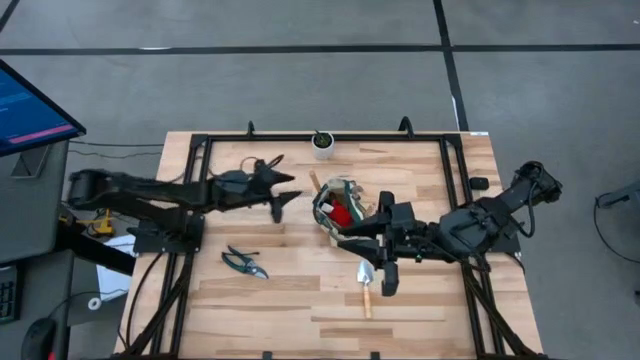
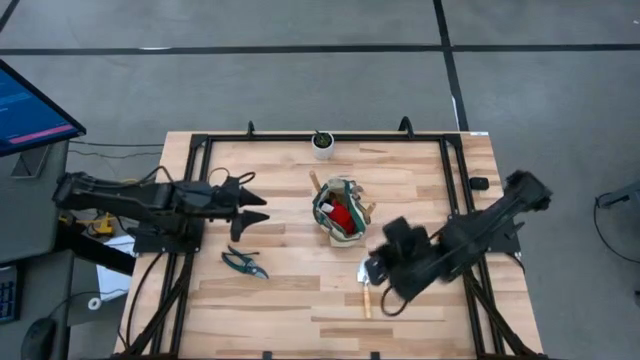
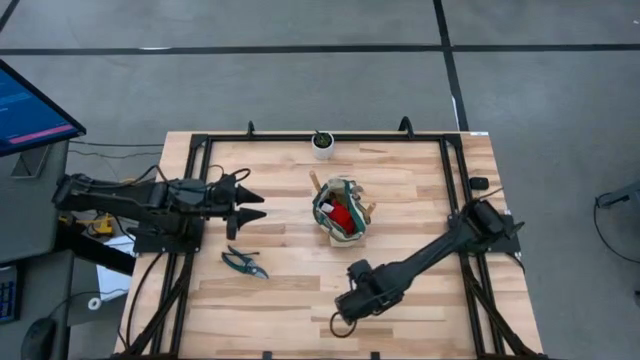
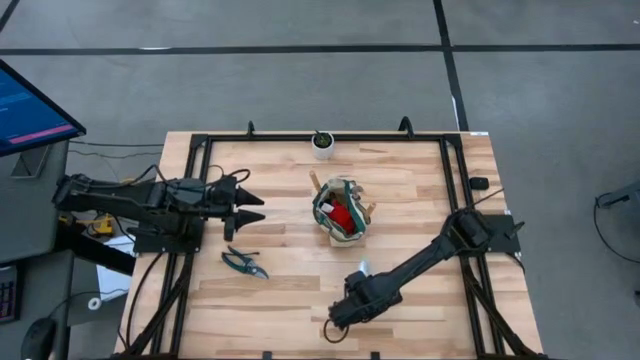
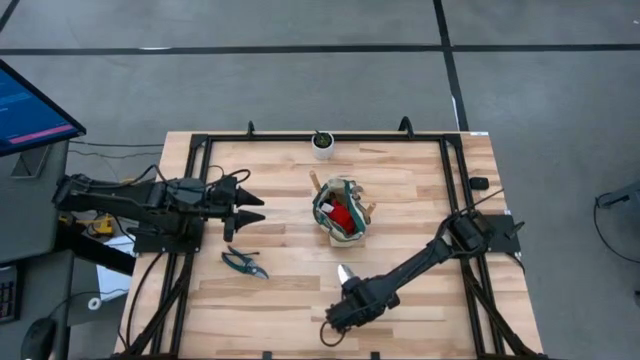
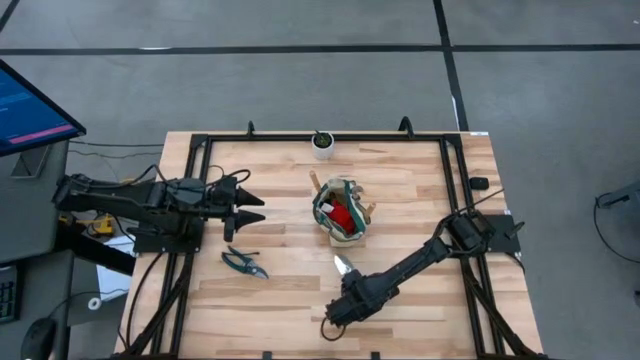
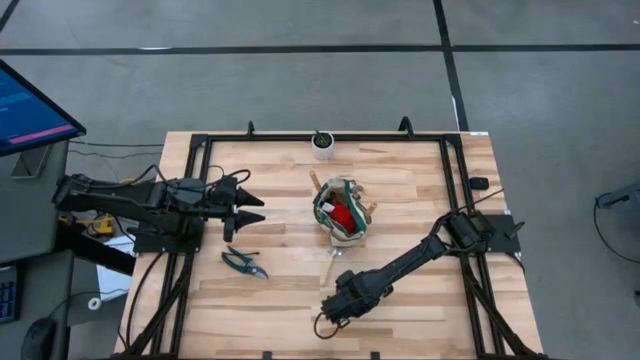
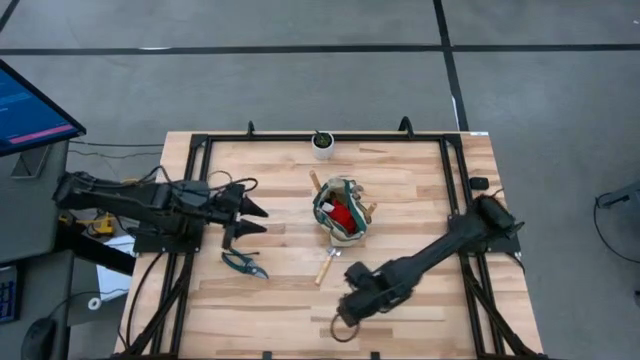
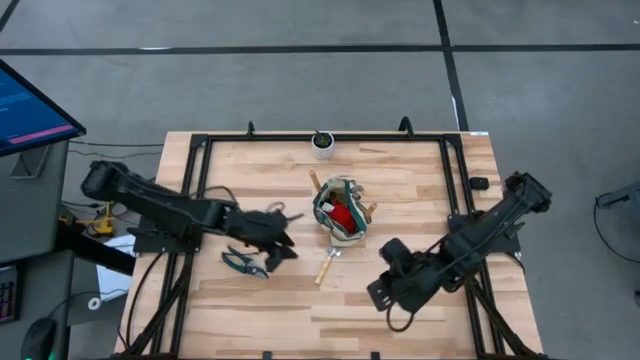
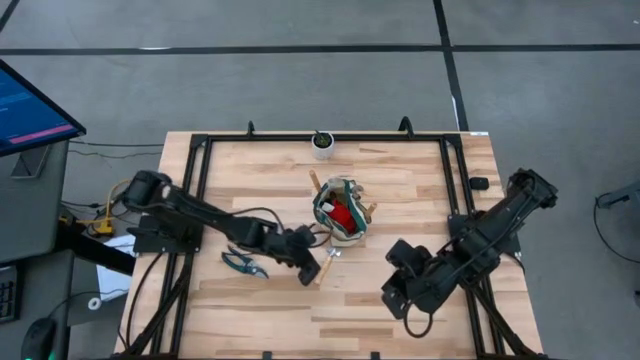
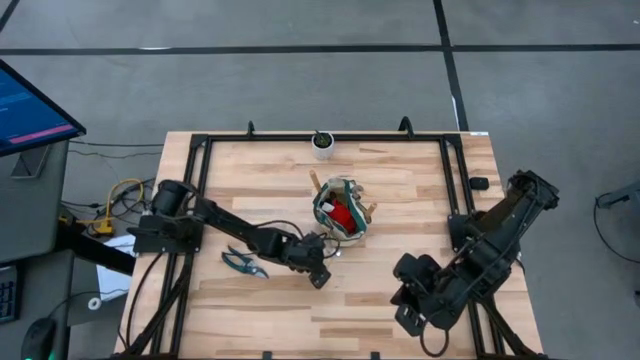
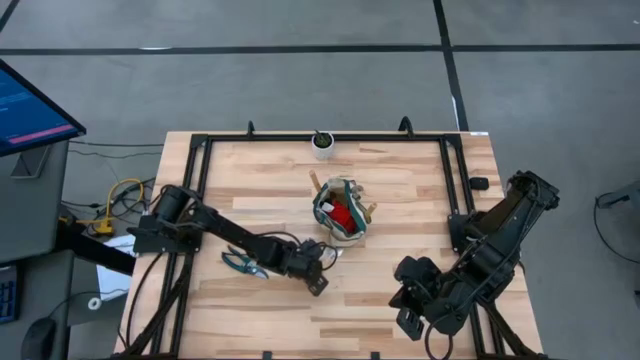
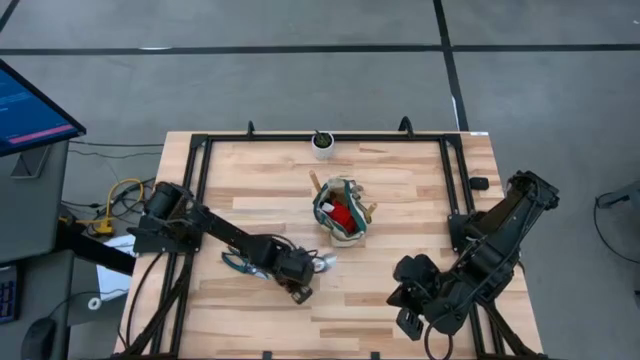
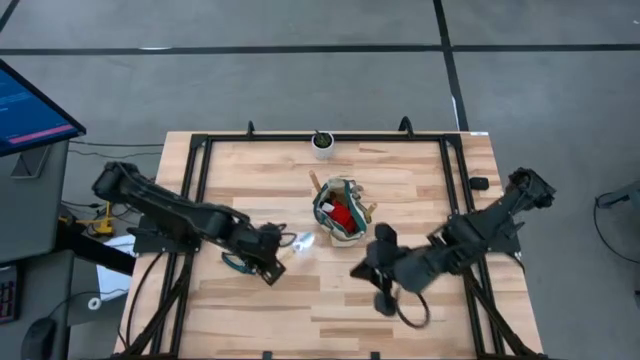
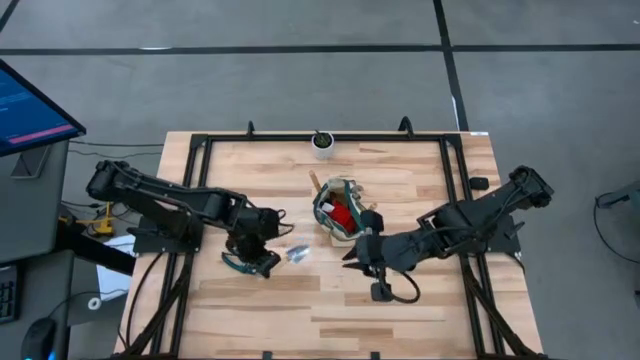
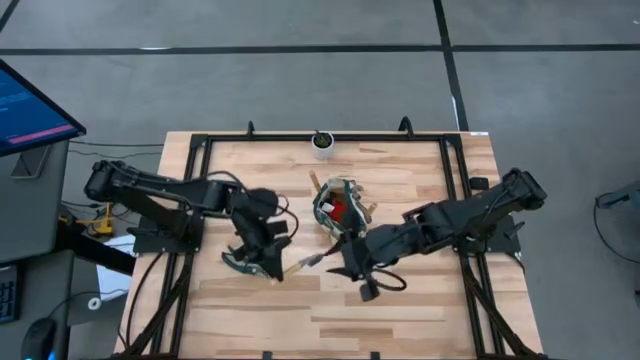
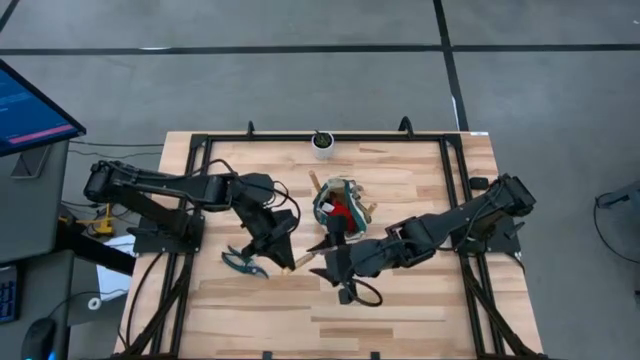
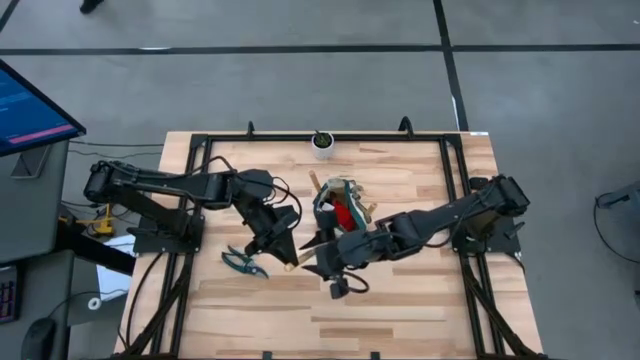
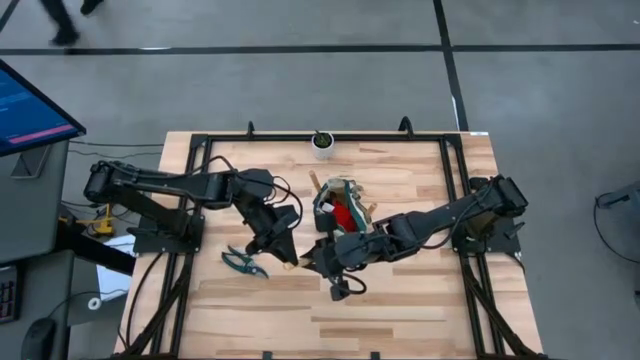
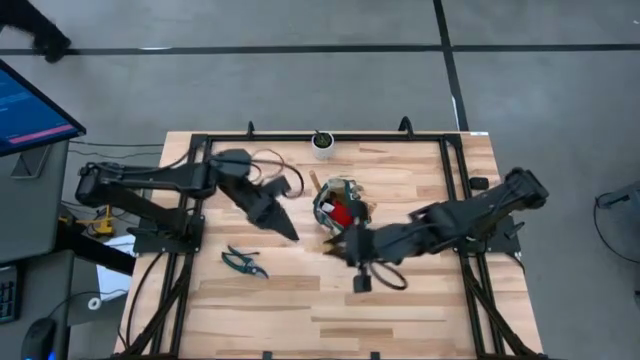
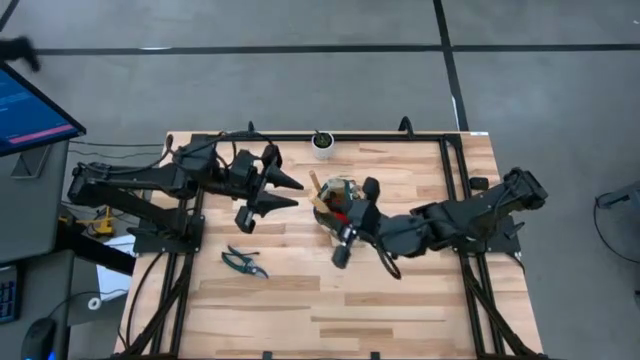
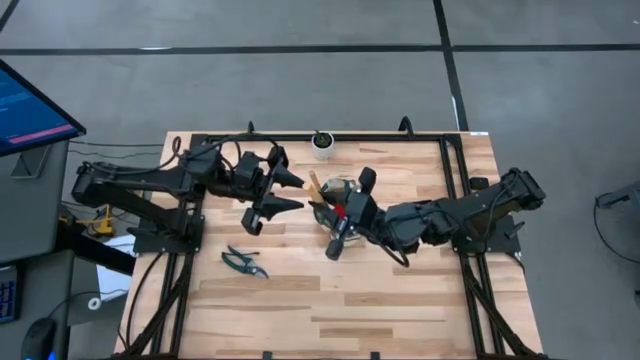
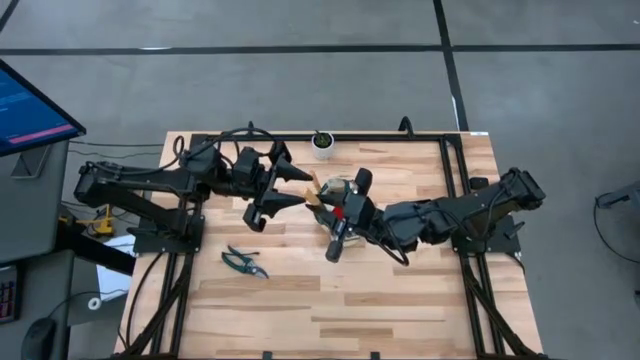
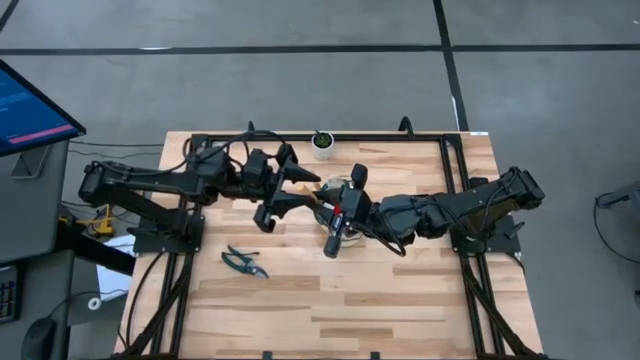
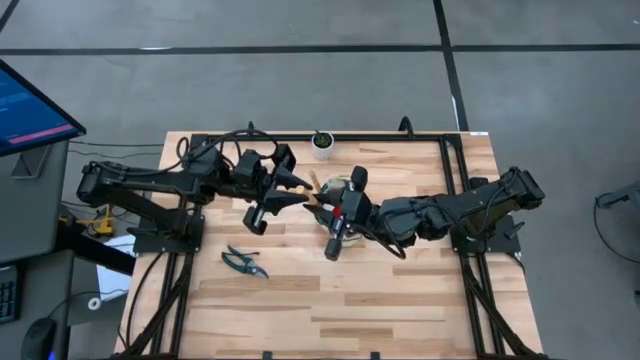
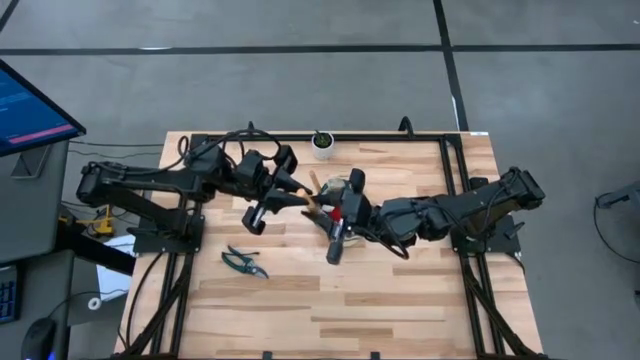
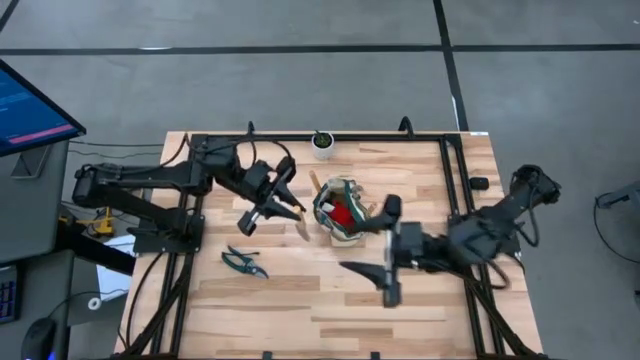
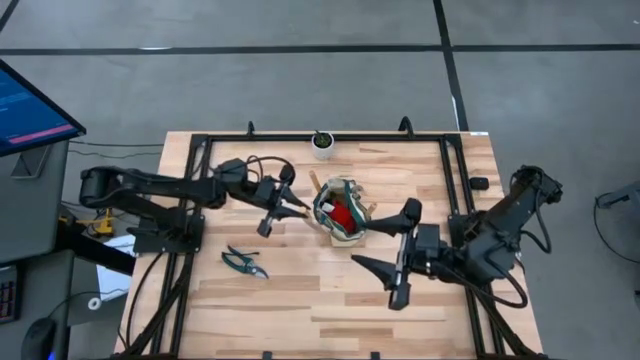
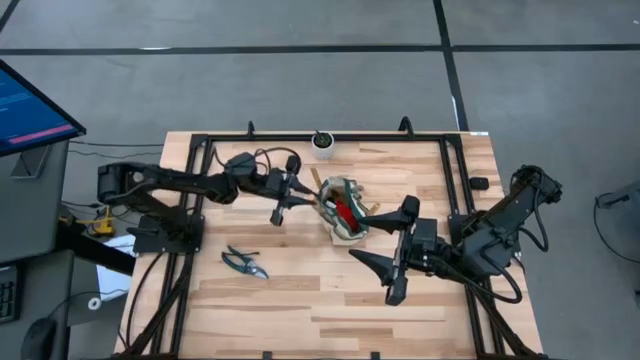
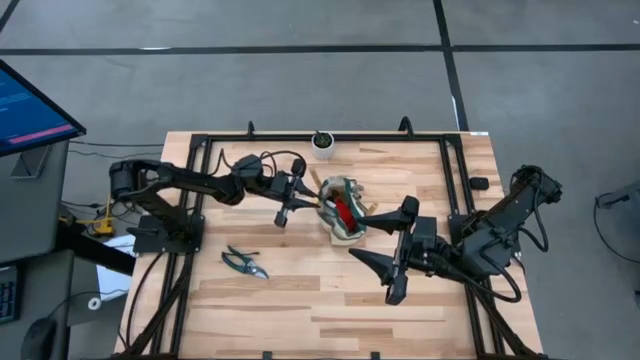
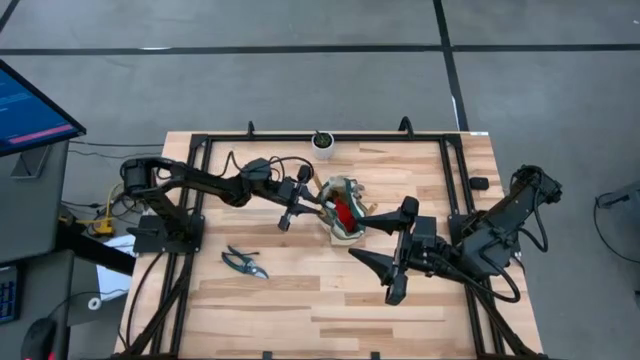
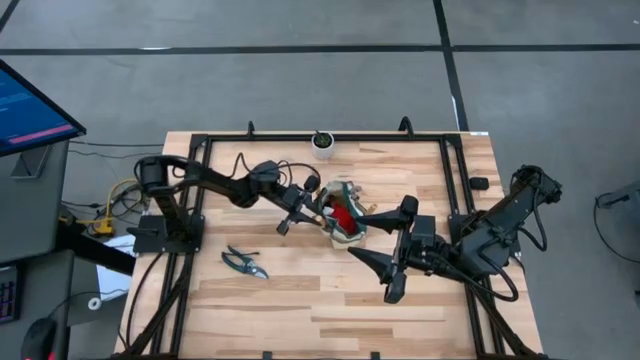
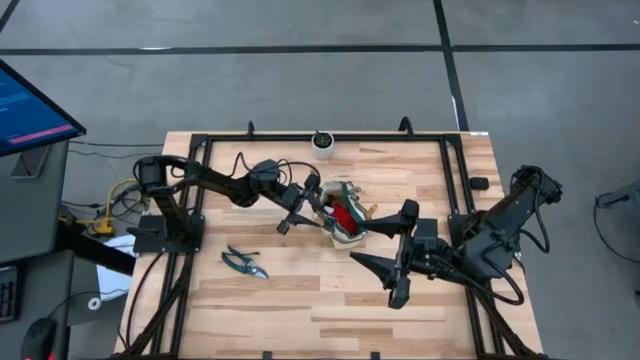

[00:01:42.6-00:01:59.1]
Task: Pick & Place Garden tools in Gardening bag
Put the brown trowel into the green gardening bag

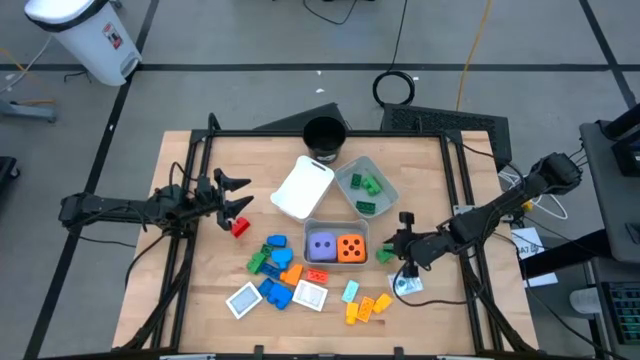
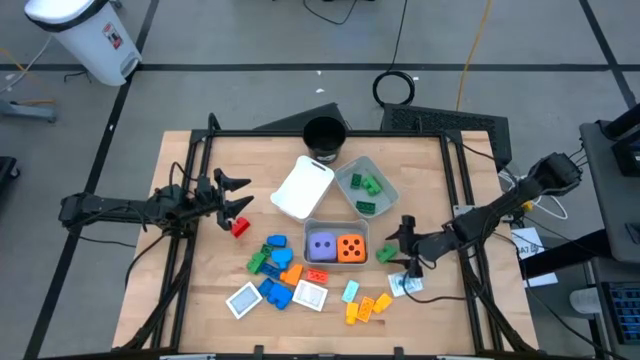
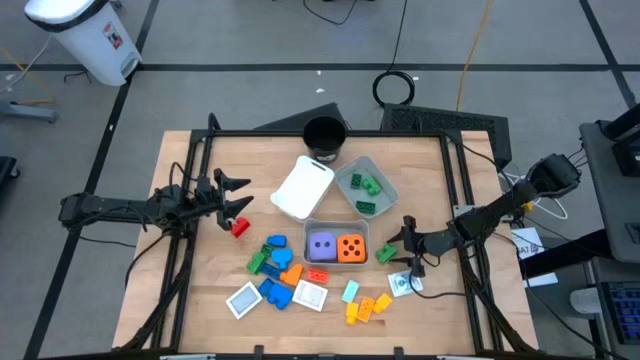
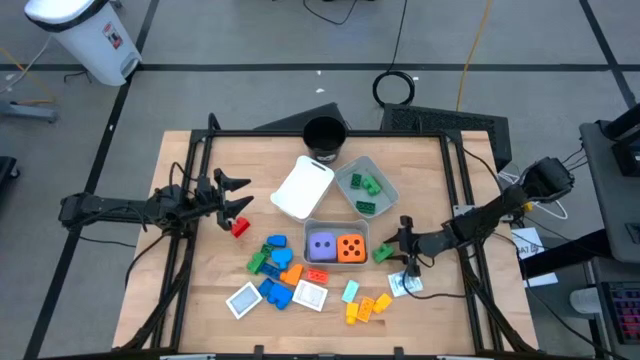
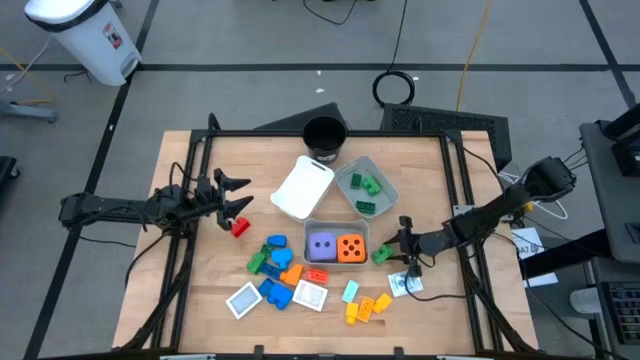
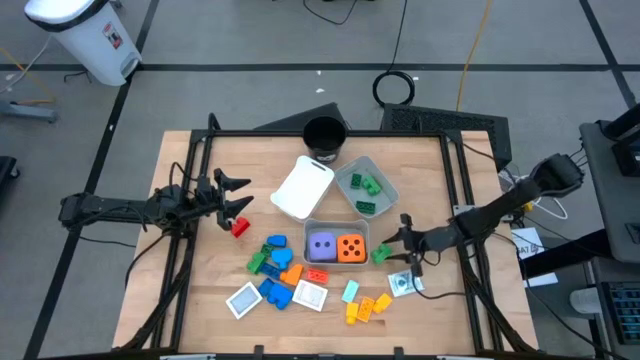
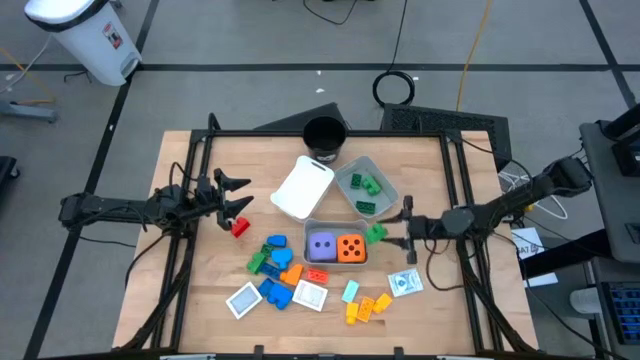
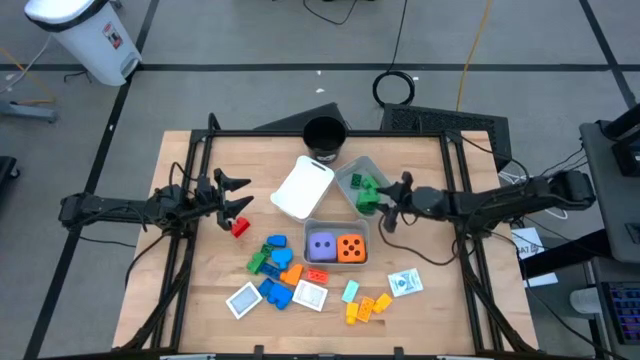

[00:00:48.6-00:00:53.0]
Task: Pick & Place Toys
Put the green game piece into the top gray bin

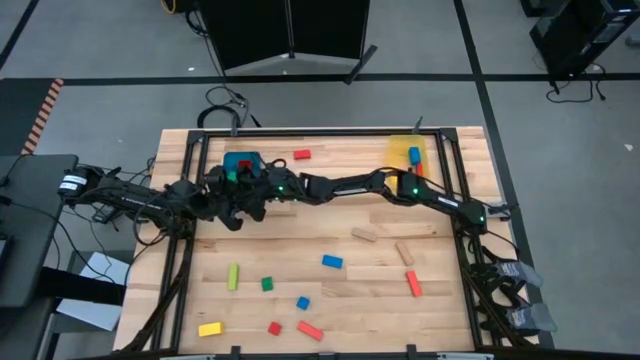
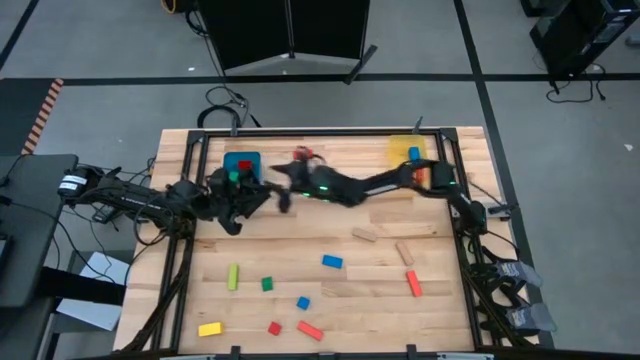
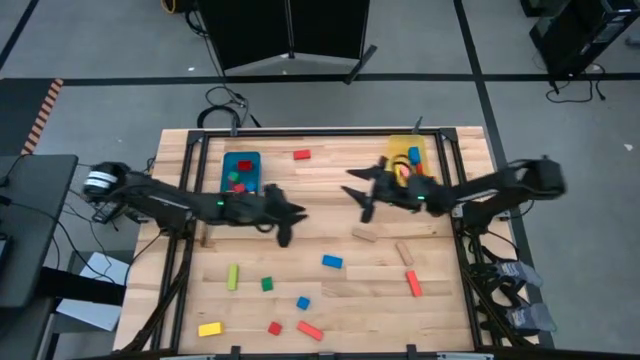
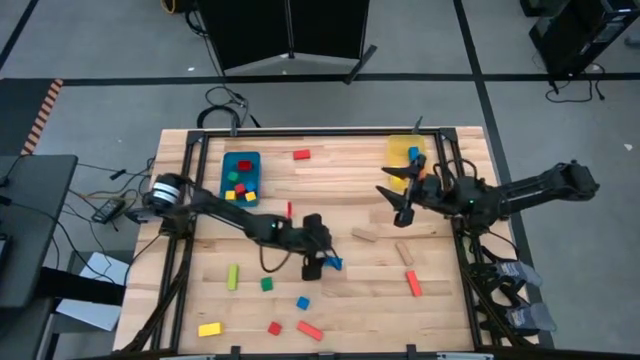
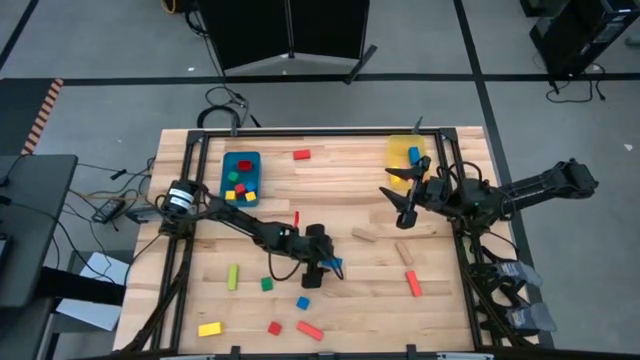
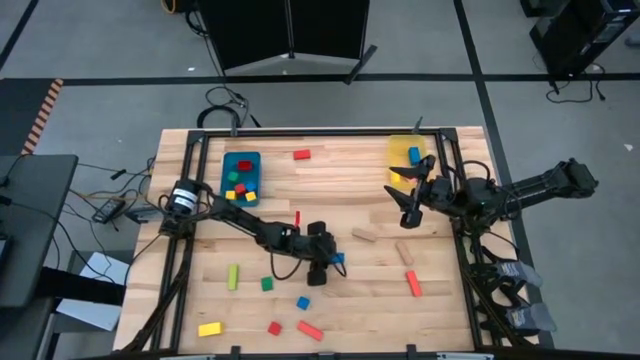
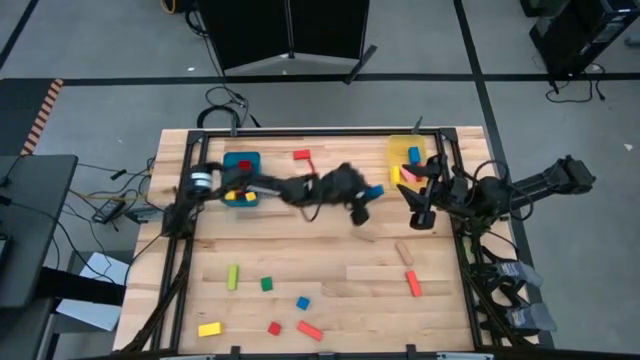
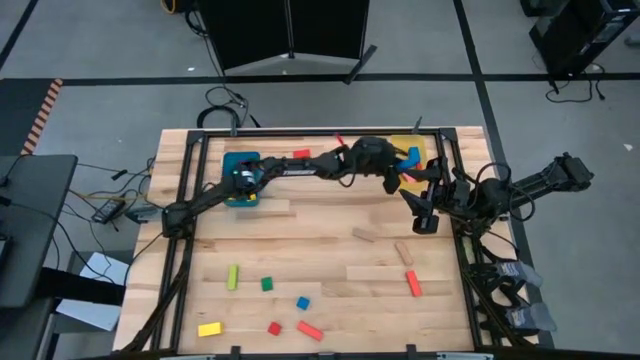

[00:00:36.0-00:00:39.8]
Task: Sort blocks by size
Put the large blue block into the yellow bin
